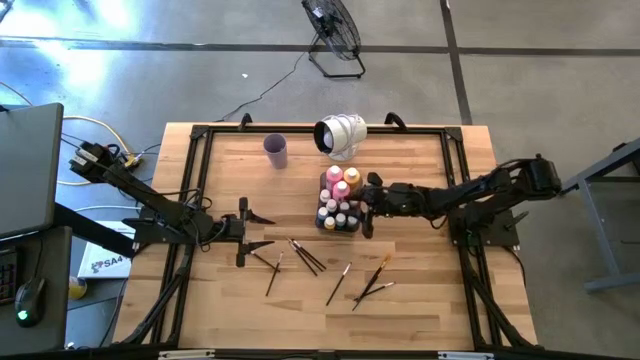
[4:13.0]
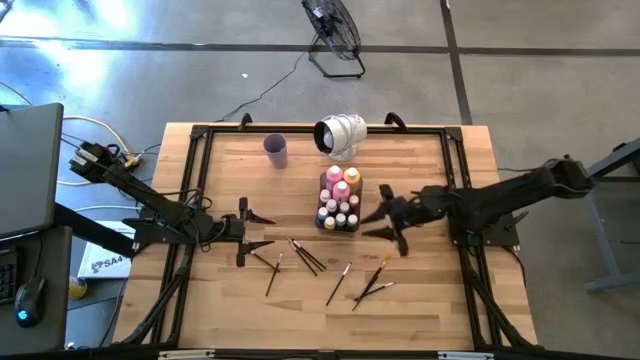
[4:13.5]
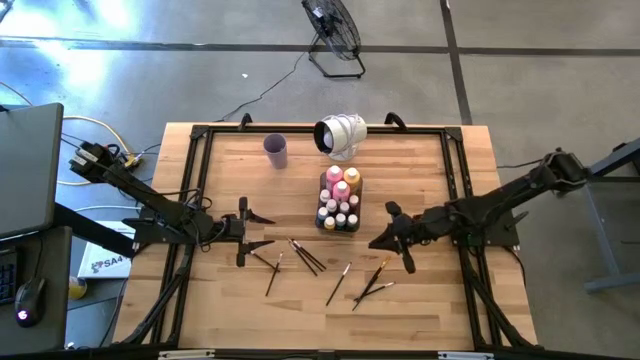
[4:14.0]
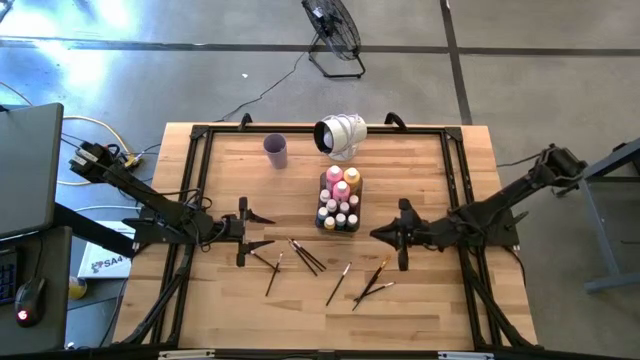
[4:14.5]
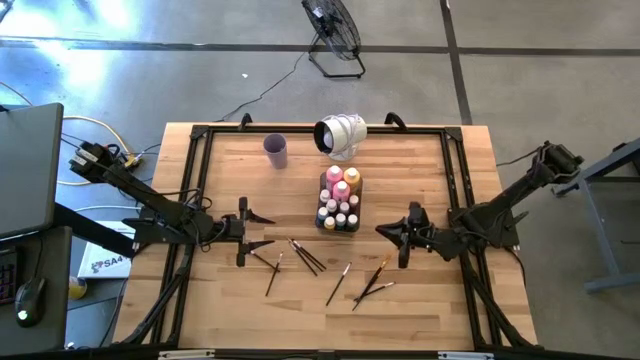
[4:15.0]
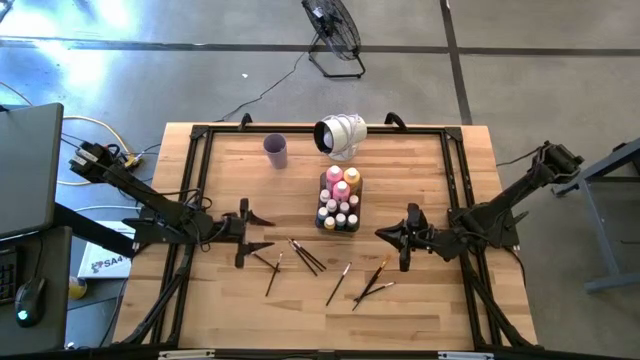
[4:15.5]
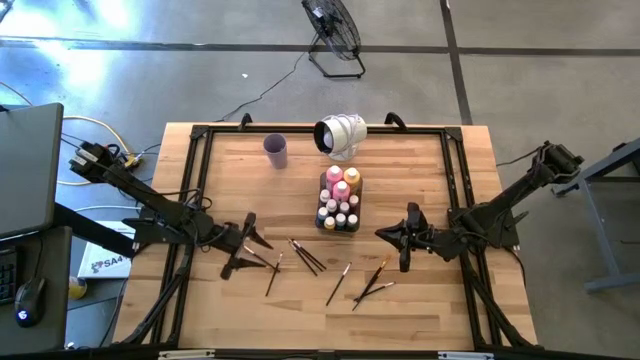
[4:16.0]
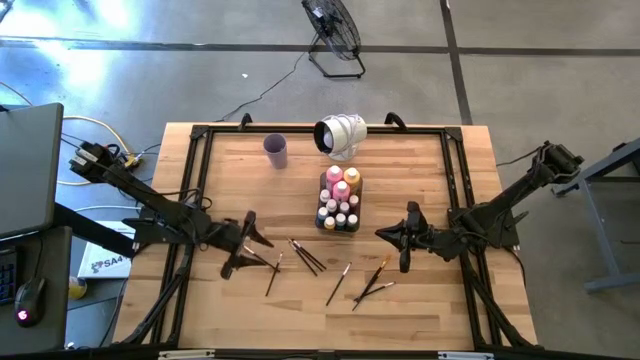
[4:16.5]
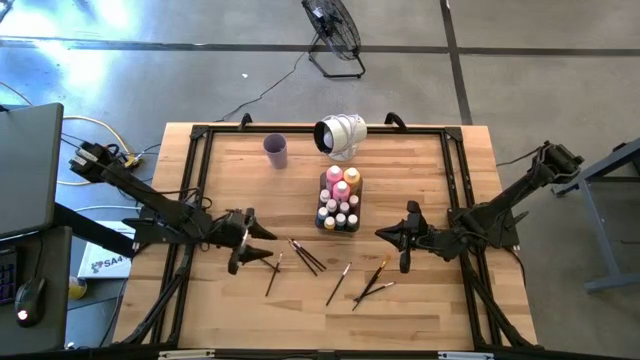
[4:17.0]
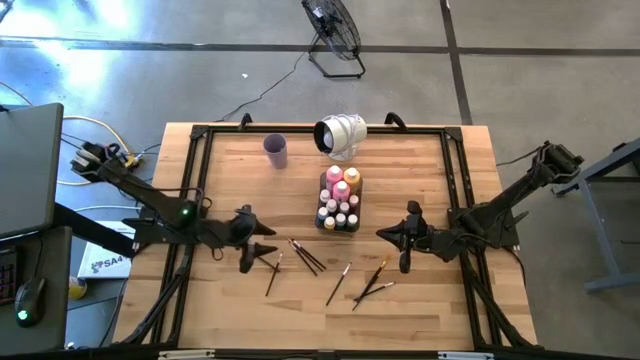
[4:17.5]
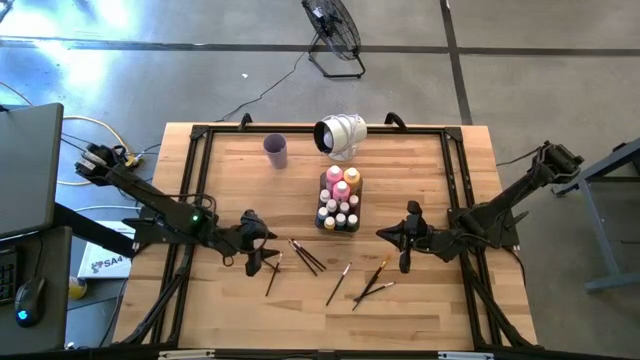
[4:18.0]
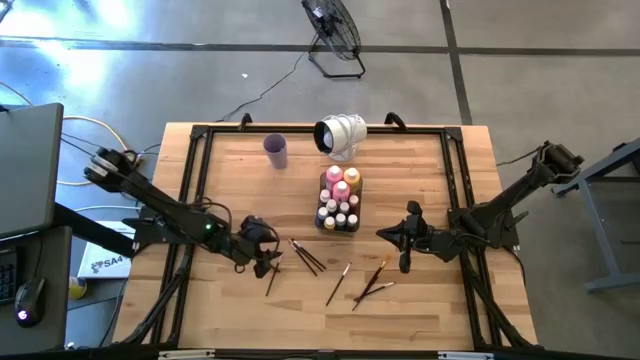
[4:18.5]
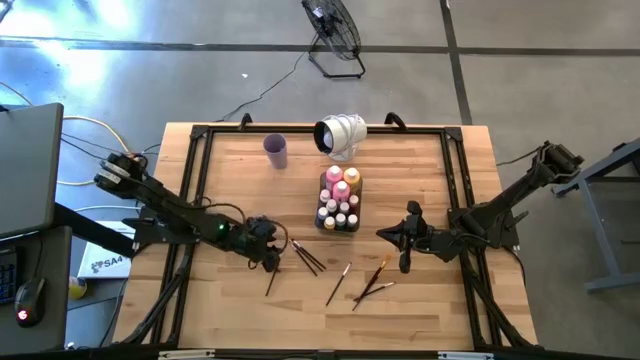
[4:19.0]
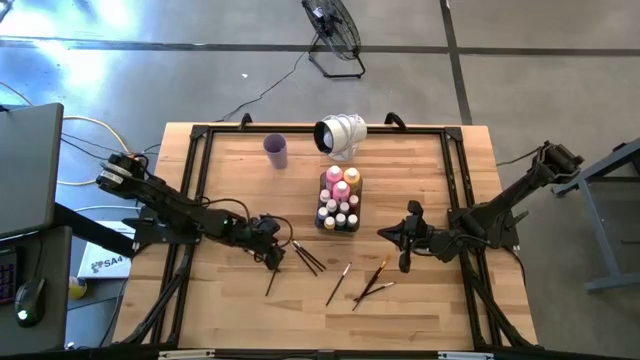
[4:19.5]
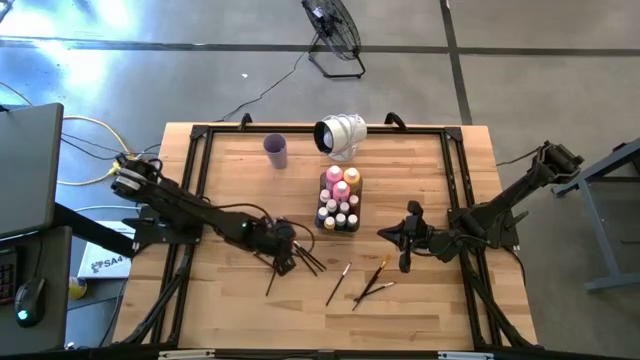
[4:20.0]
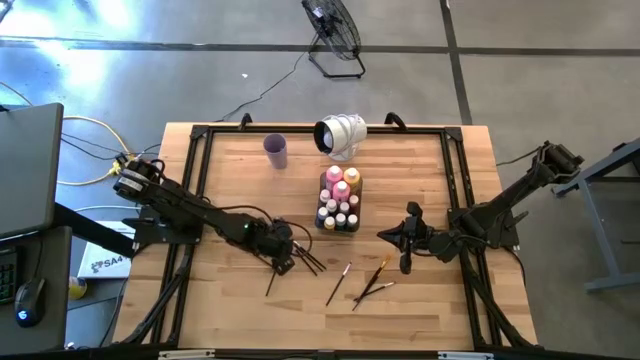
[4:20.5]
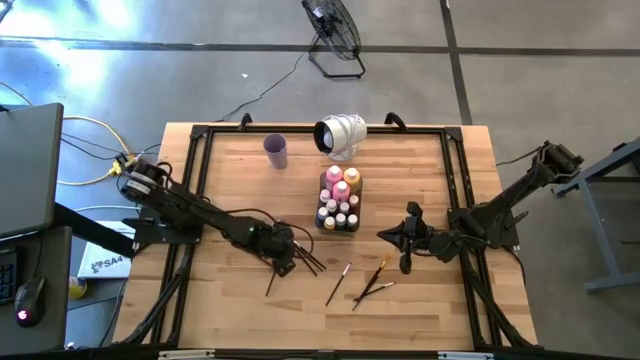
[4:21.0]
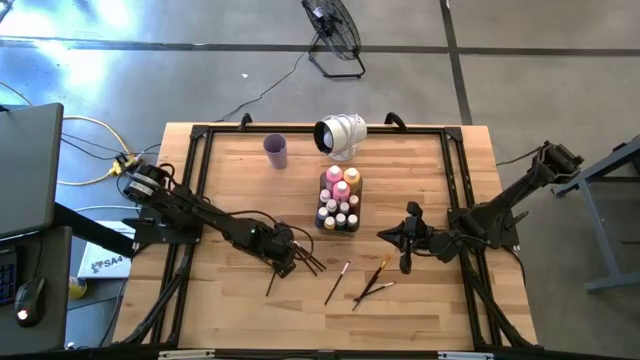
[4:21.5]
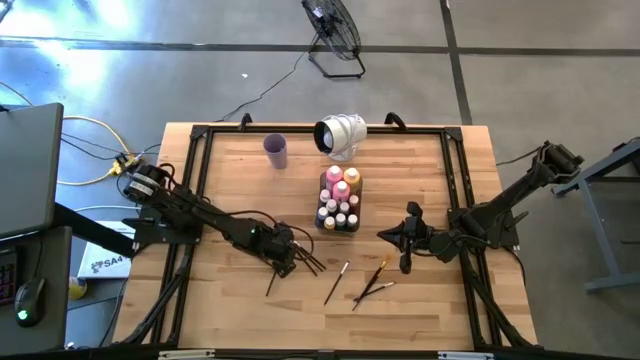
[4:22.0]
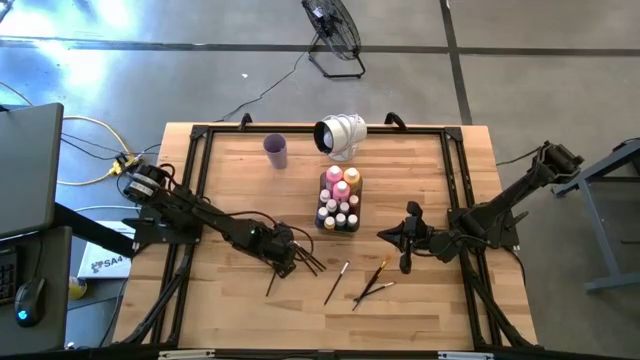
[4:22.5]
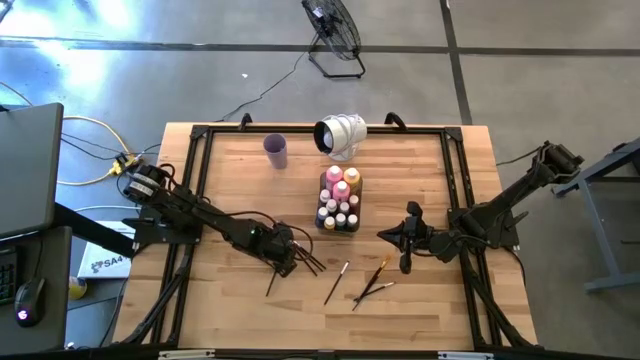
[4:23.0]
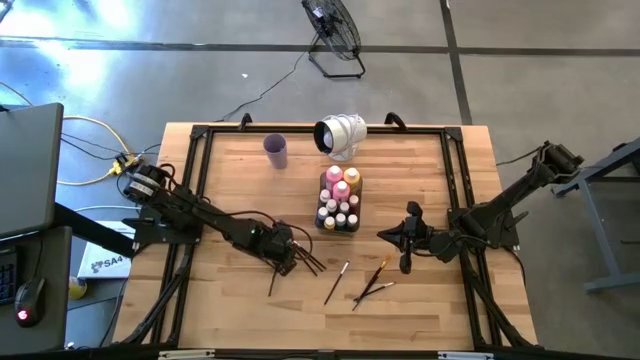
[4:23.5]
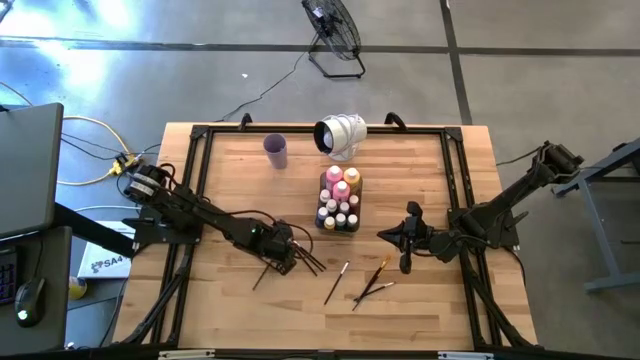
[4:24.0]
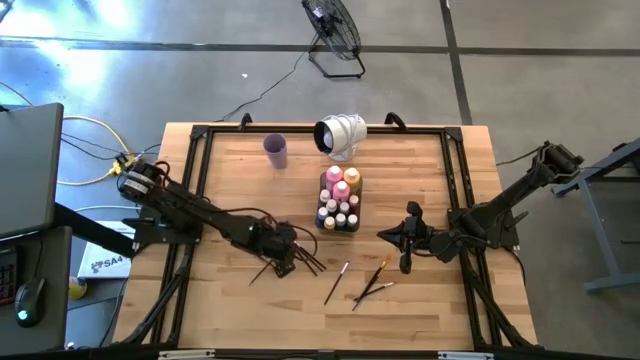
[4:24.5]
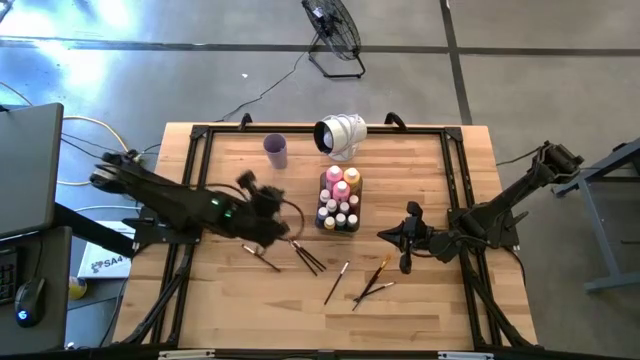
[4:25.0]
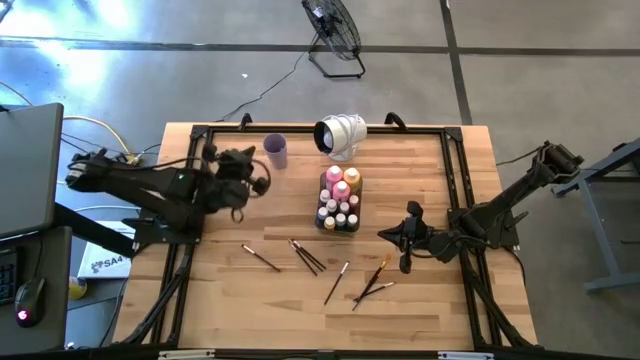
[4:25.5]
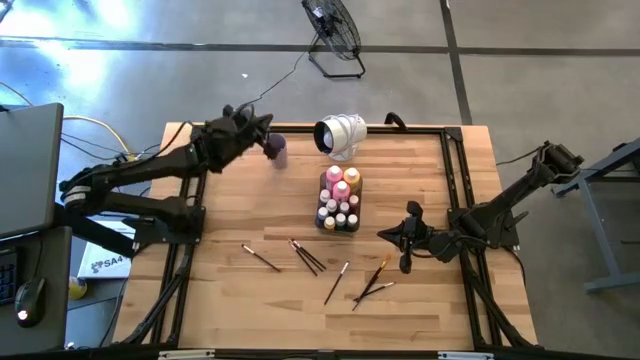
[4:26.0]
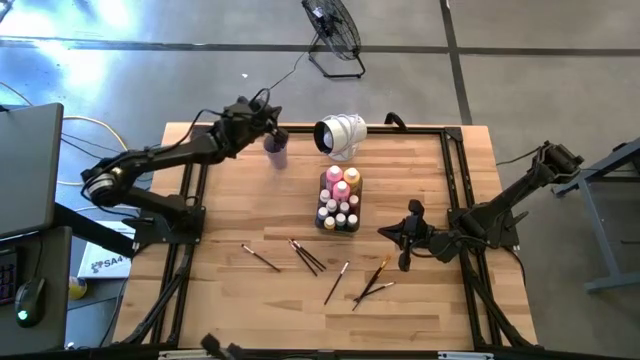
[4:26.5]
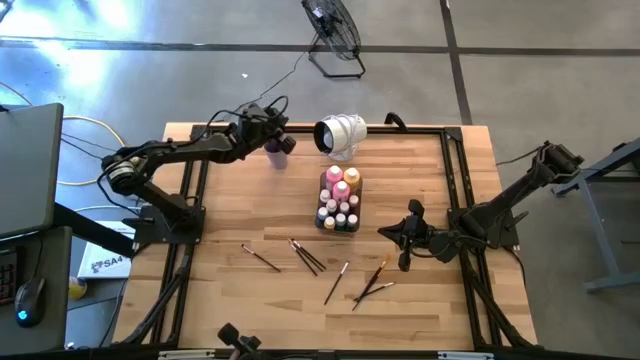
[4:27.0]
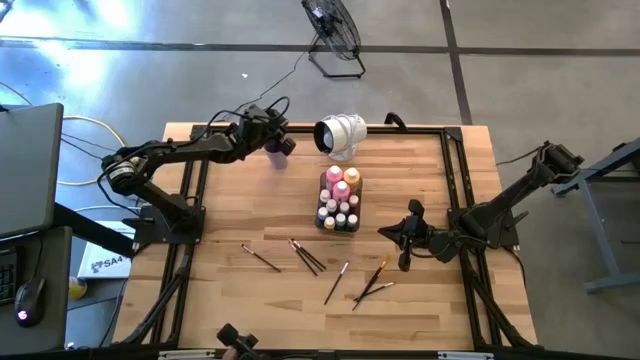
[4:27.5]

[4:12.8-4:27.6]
Task: Pick & Place Paint Supplies
Put the silver paint brush into the violet cup

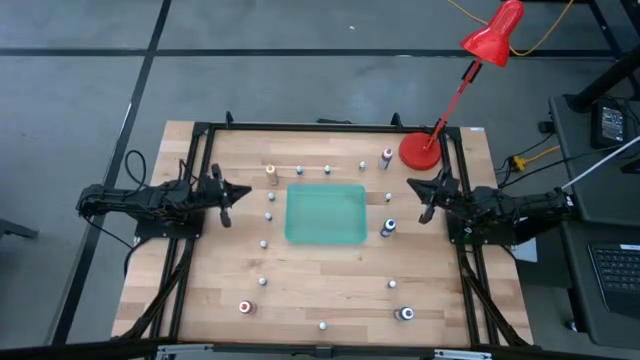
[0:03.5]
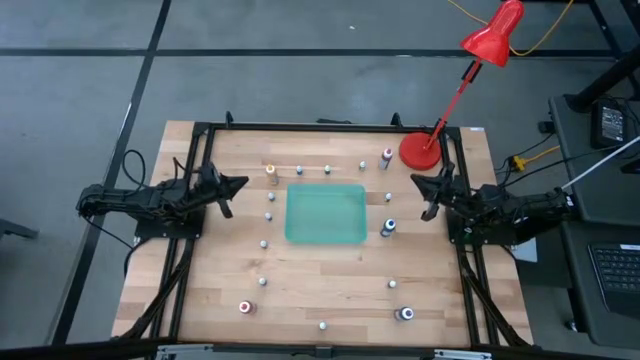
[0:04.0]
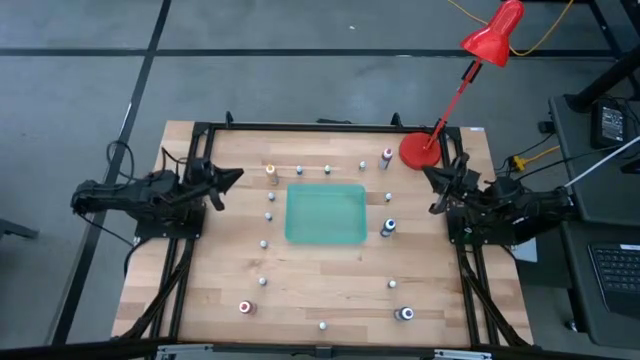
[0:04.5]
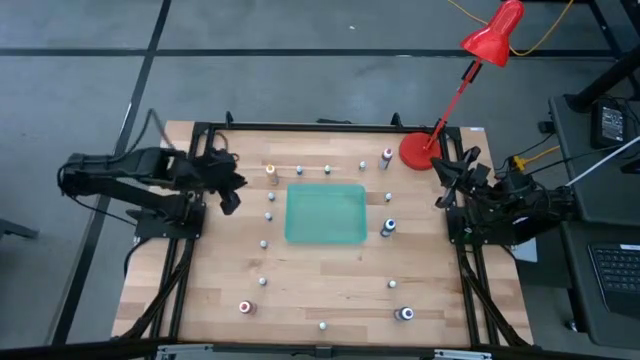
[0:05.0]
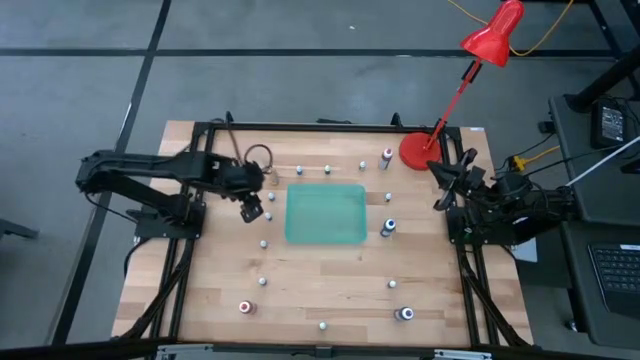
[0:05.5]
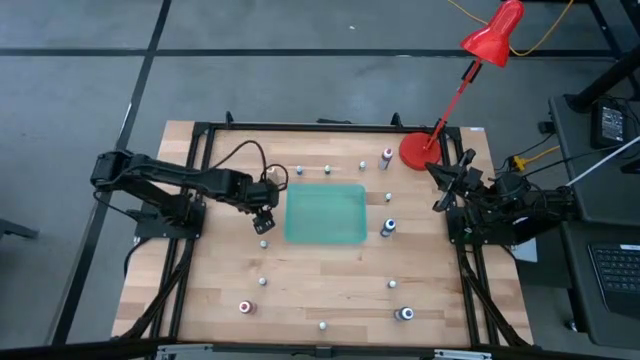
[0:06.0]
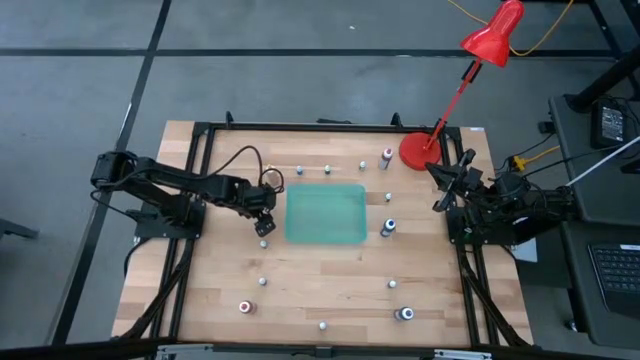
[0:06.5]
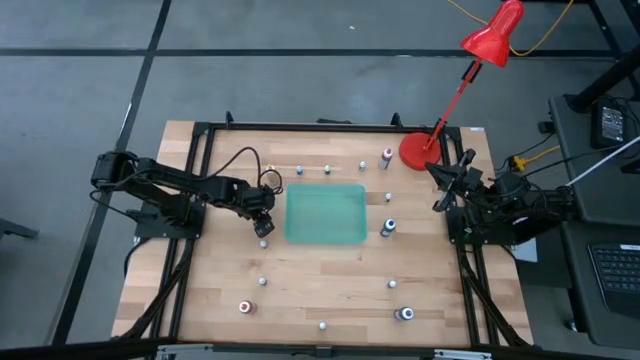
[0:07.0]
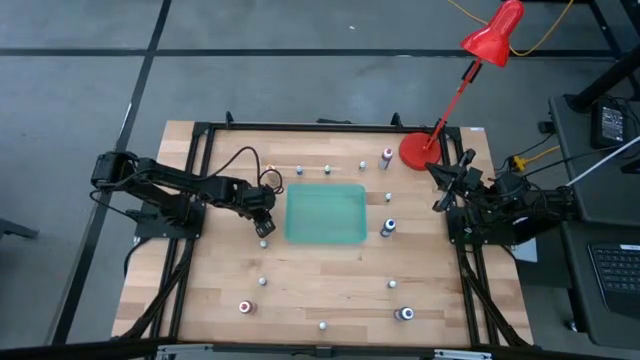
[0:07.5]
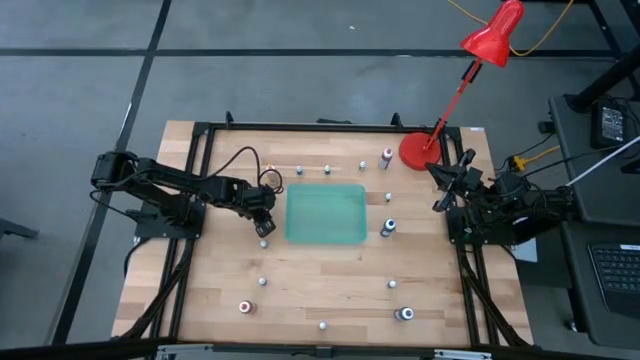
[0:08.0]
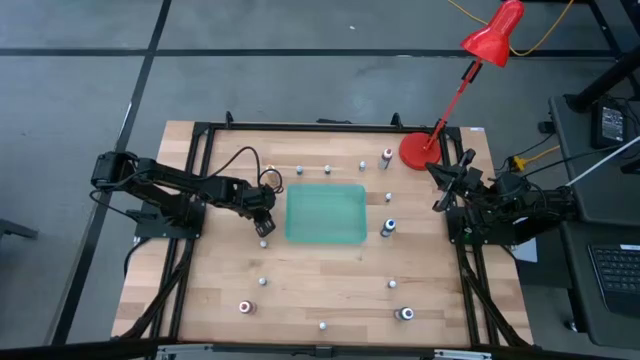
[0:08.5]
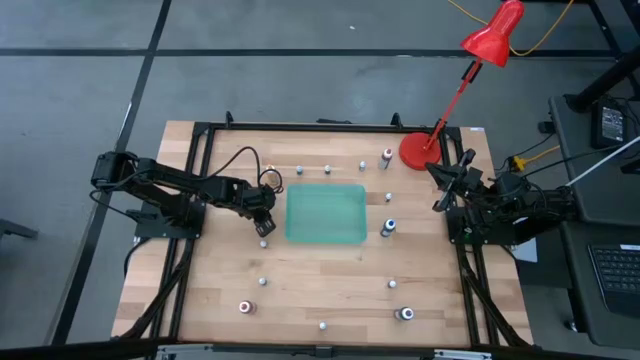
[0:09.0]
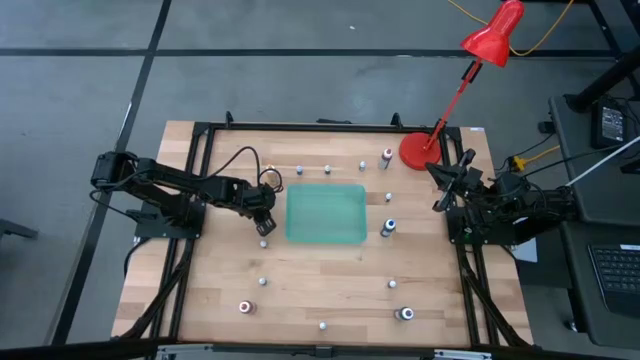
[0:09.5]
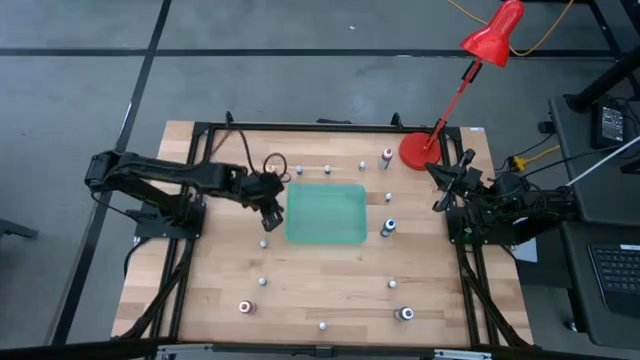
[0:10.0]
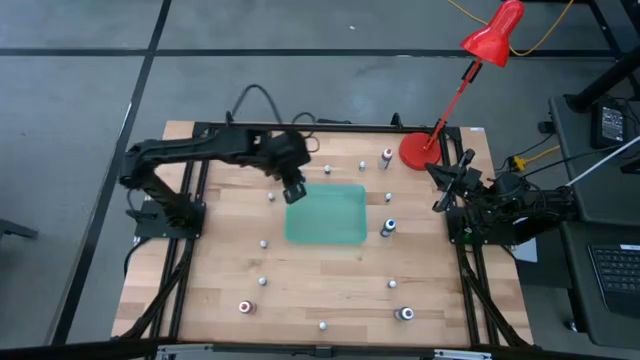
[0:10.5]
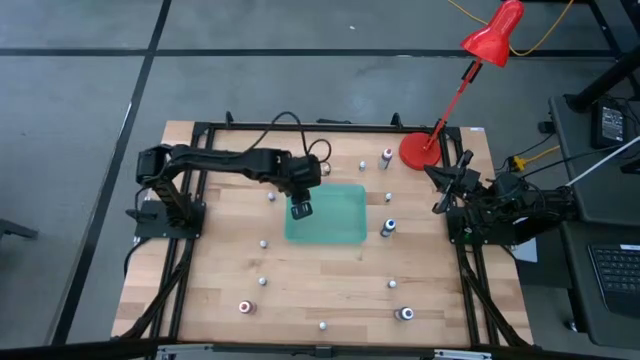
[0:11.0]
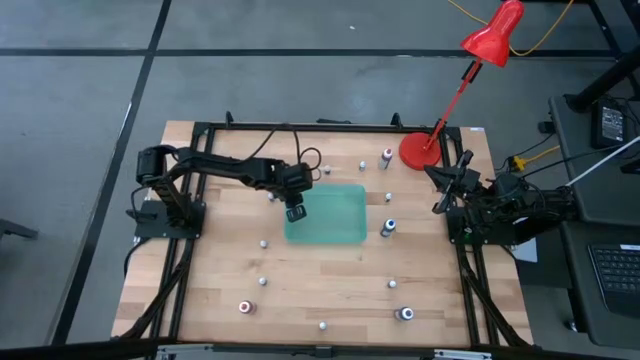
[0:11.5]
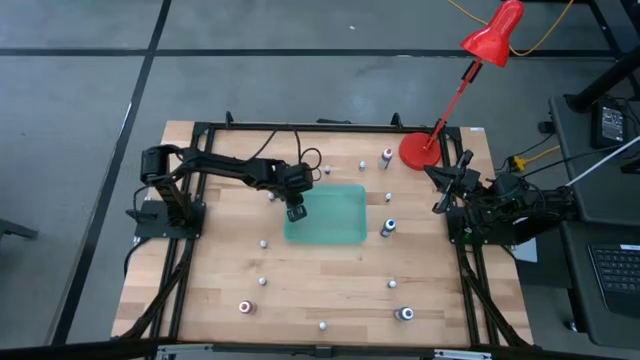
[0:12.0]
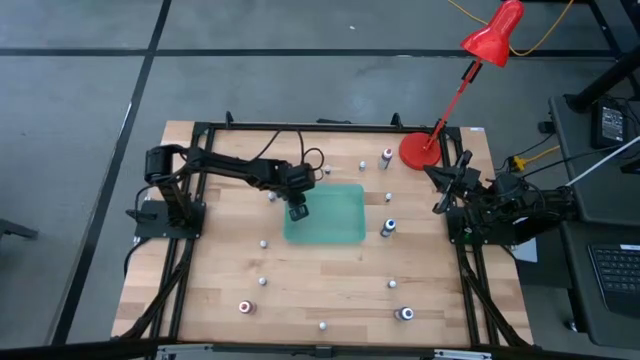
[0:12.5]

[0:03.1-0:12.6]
Task: Pick & Place food coloring
Put the small red food coloring bottle into the green bin
